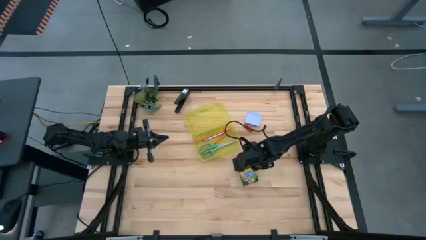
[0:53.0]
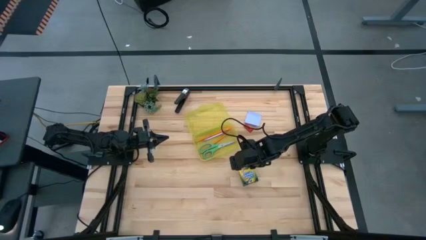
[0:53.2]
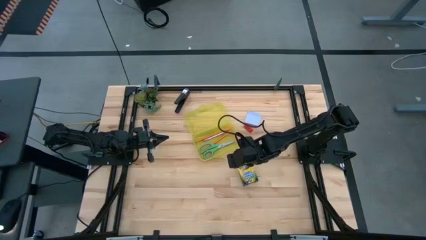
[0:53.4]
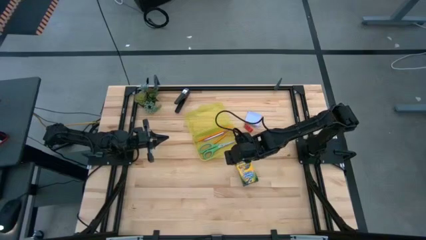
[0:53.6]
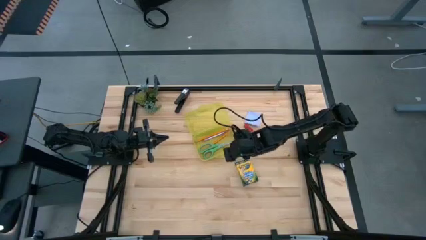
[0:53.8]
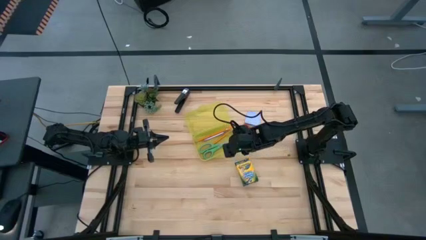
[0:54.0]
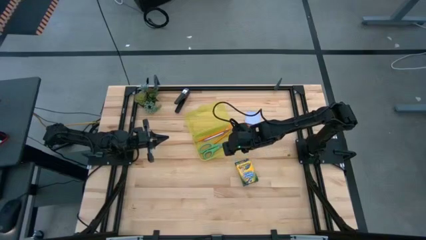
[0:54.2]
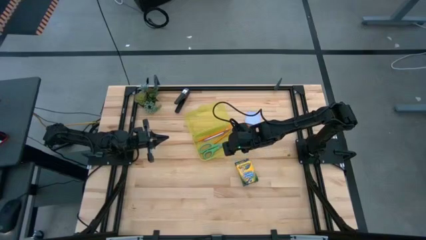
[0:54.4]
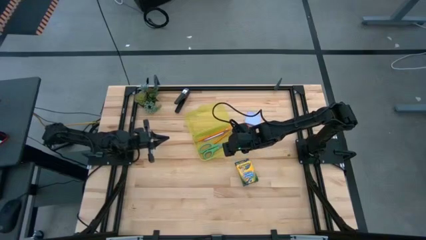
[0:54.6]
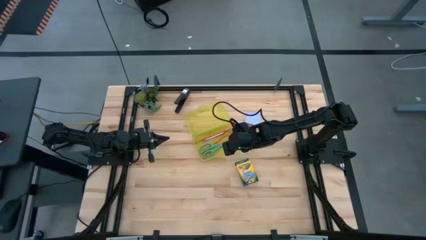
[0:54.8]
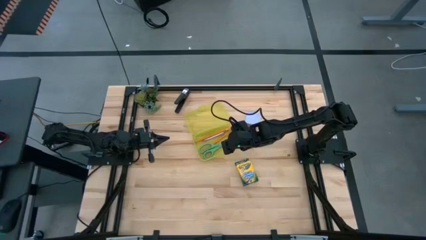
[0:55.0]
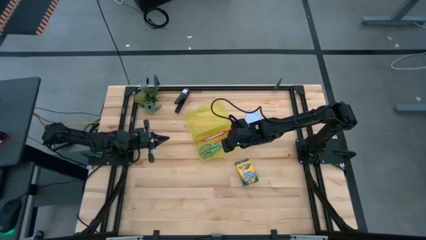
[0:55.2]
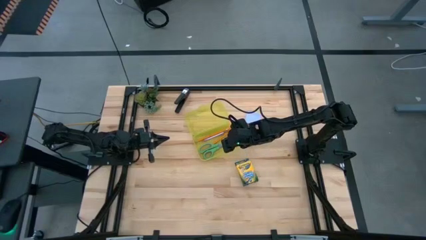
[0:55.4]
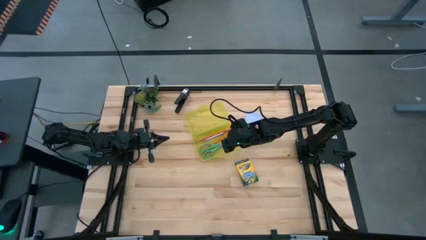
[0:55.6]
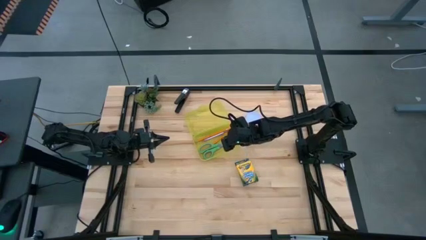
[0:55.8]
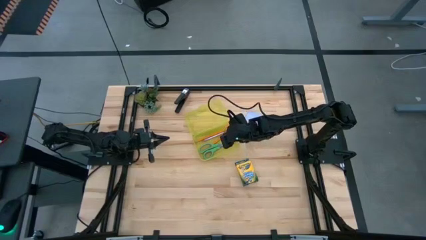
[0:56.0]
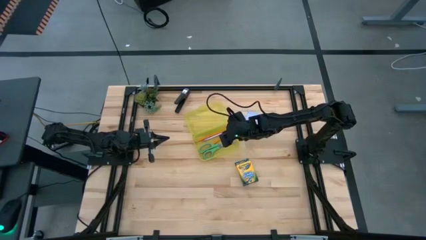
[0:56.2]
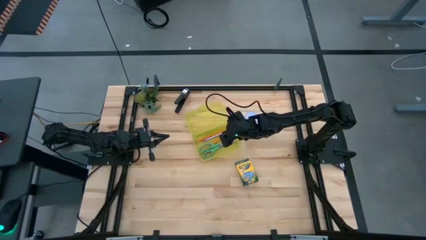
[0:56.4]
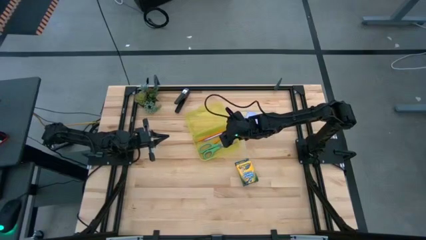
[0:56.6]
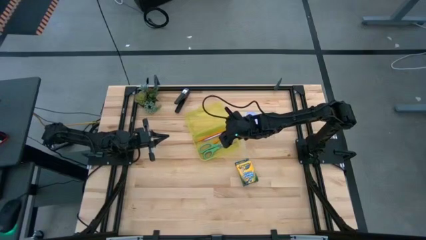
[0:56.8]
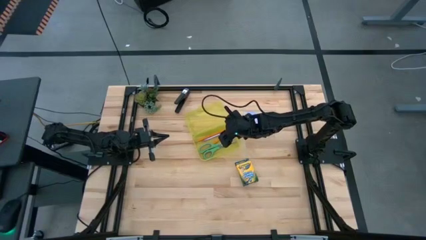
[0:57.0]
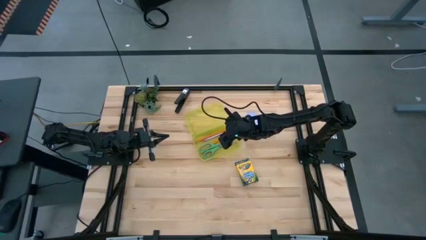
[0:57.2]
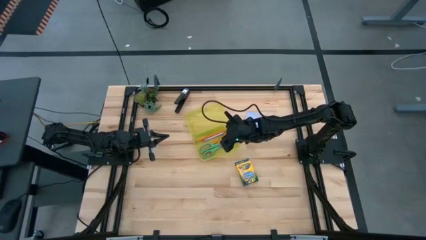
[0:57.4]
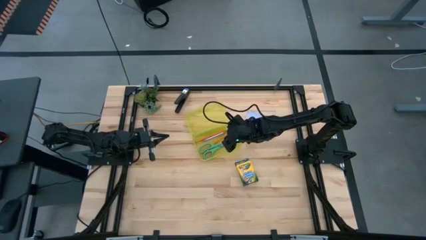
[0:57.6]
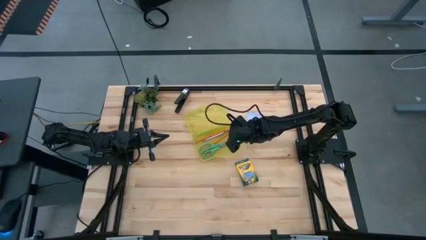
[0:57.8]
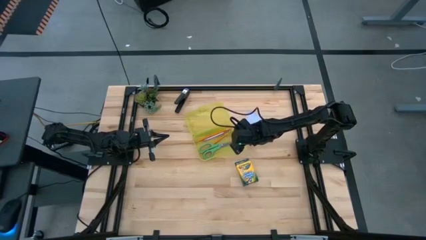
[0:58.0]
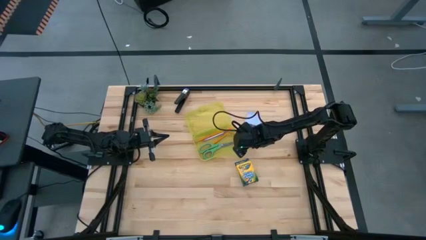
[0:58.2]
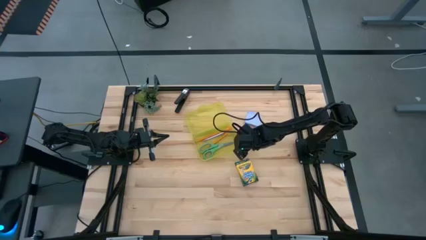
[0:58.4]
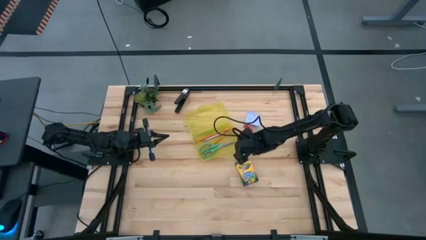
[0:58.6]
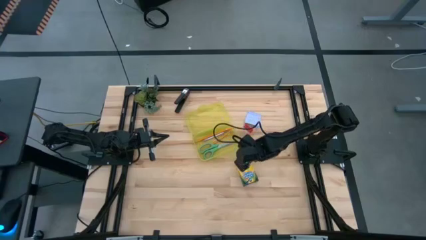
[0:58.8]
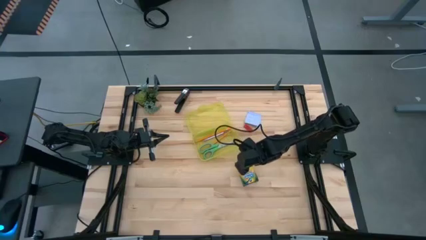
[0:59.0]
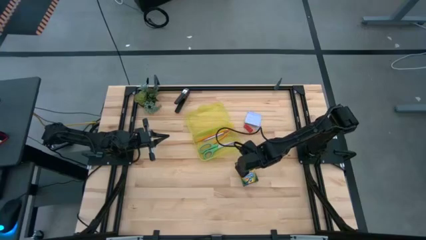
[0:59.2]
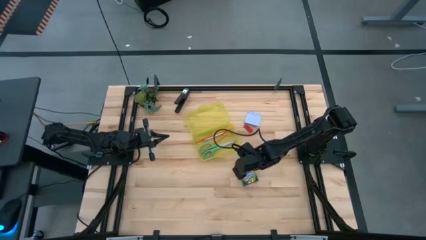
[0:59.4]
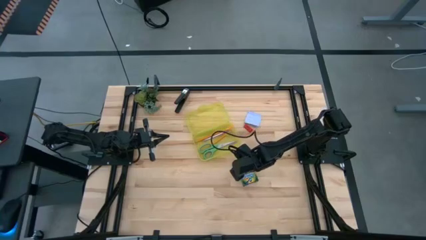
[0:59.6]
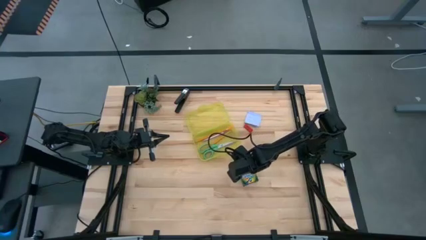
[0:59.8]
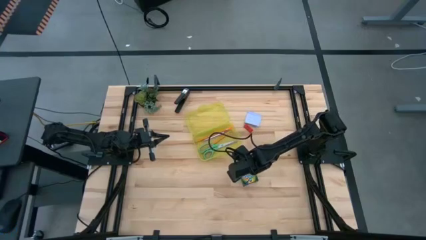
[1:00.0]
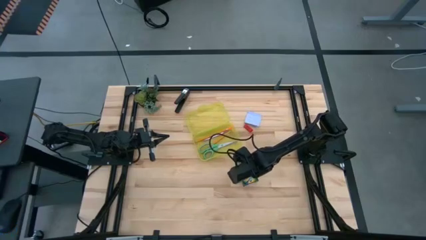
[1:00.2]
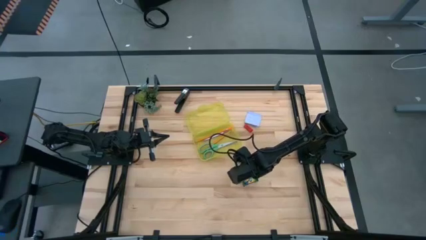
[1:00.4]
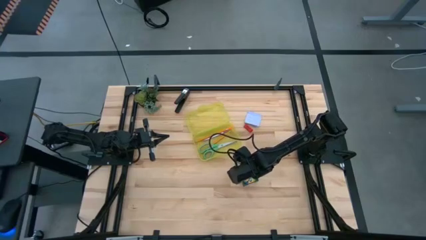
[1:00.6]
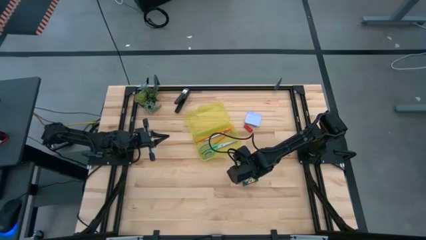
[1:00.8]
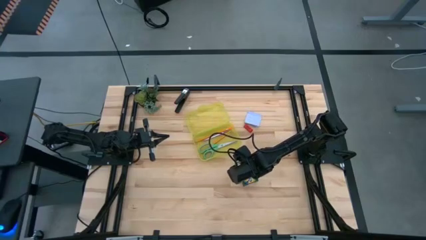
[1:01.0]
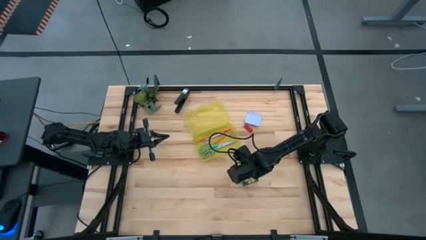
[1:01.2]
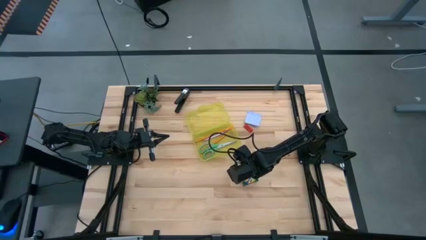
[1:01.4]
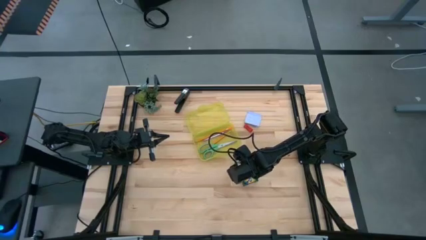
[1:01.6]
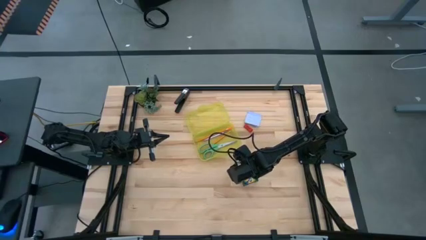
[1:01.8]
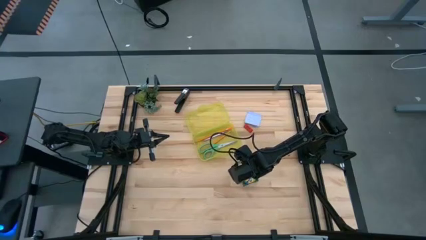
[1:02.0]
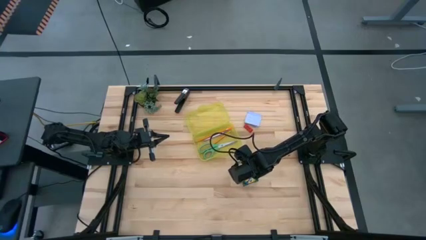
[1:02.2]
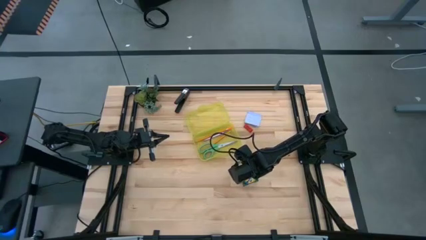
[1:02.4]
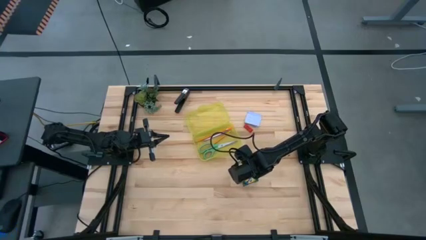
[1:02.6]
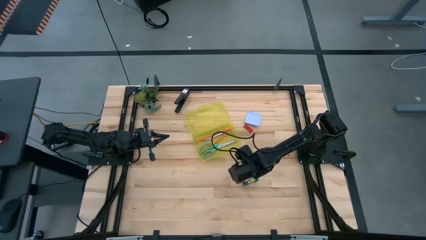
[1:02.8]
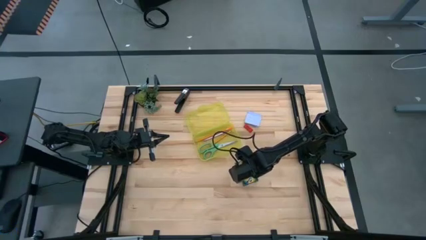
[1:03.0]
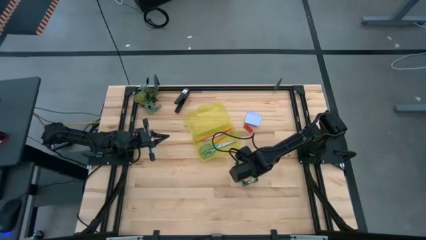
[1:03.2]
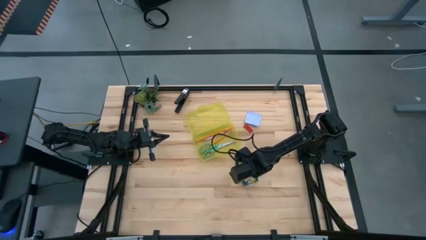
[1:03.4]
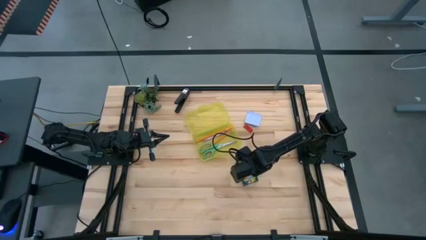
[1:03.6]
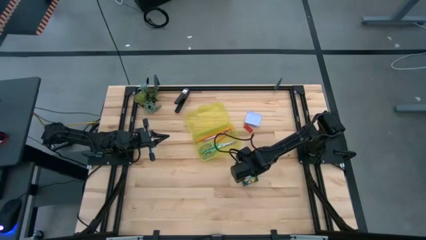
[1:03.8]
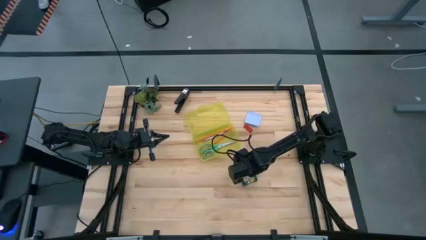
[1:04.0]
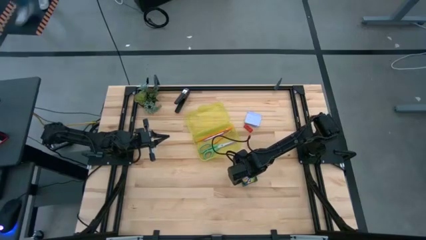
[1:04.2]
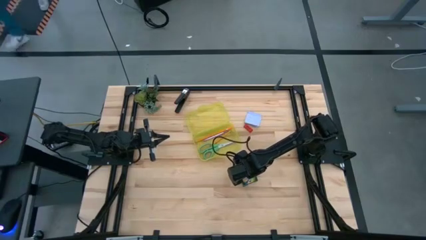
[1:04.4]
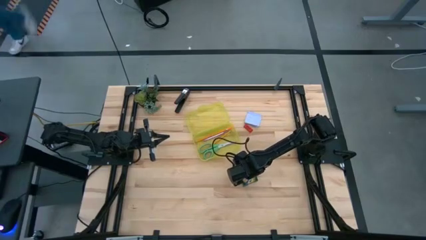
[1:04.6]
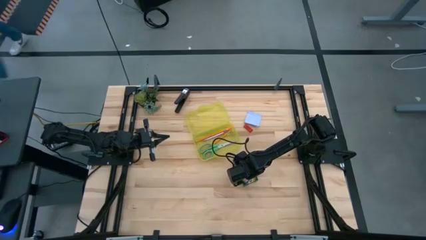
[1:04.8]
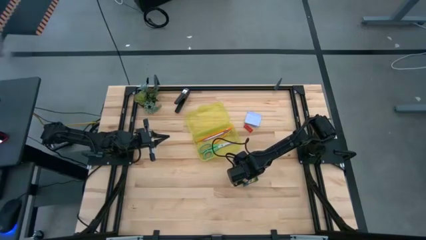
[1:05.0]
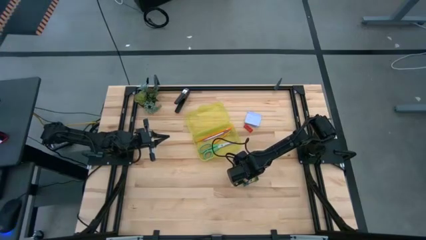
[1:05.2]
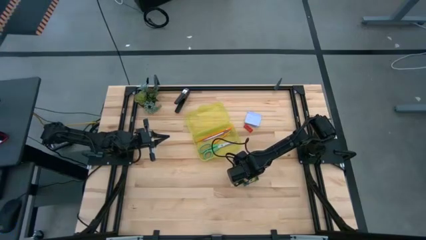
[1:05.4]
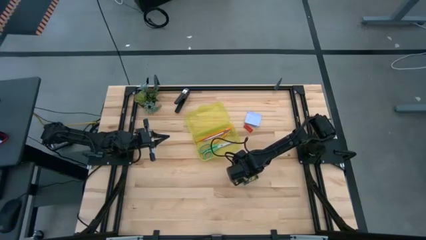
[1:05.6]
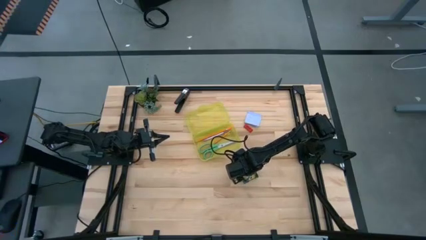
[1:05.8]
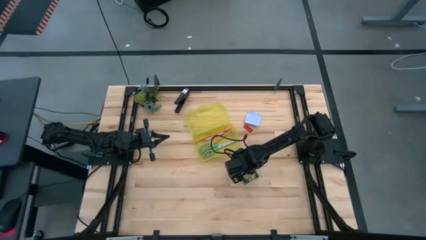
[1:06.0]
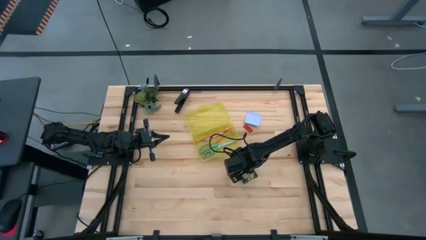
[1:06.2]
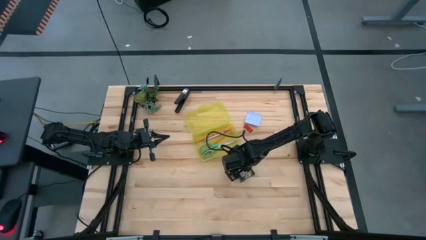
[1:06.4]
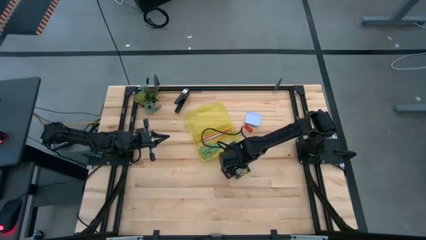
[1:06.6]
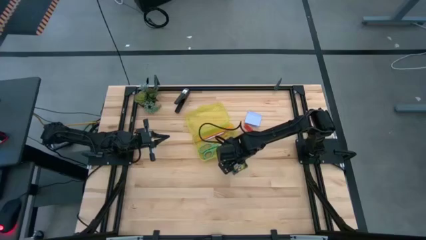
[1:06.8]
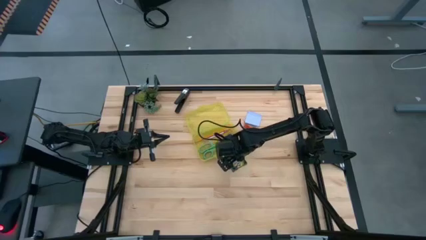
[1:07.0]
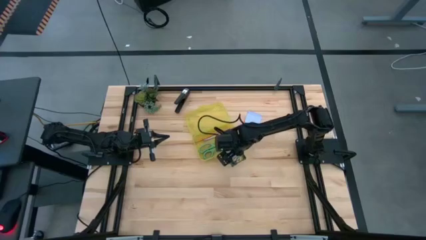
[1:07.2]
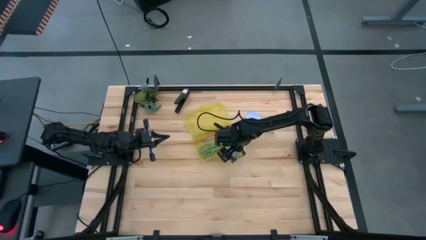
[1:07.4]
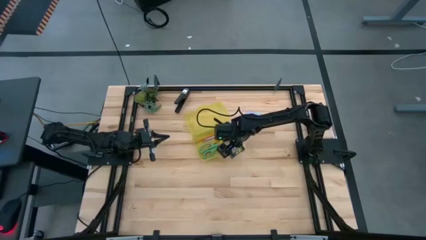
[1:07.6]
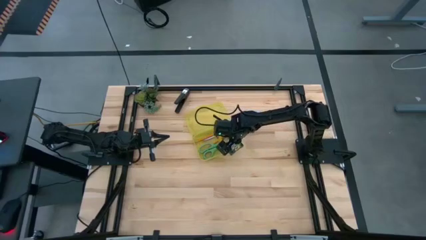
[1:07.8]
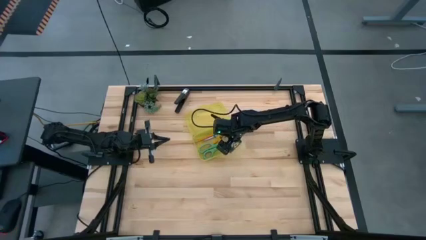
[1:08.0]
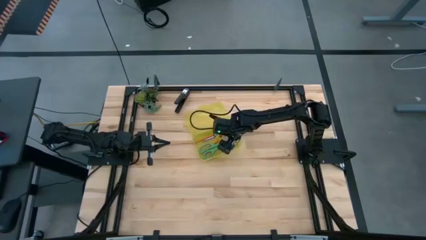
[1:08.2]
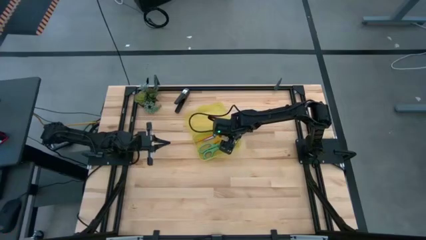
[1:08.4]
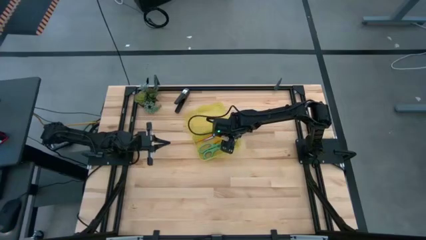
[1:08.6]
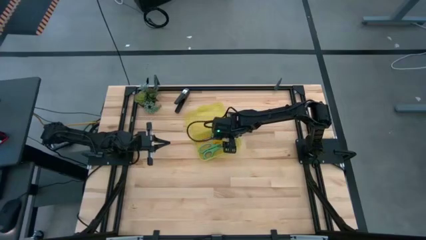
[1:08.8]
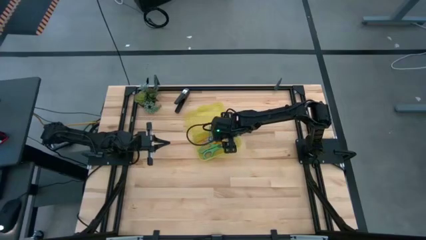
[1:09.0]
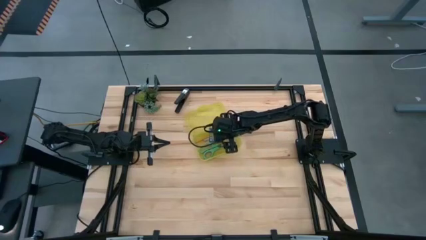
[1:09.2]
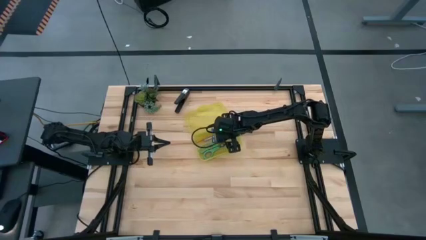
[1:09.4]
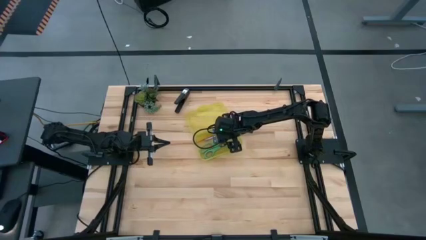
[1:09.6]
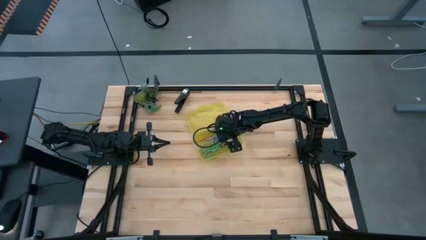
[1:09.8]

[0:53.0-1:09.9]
Task: Pack school essentials
Put the yellow crayon box into the yellow supply box
